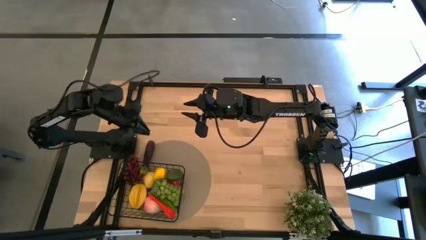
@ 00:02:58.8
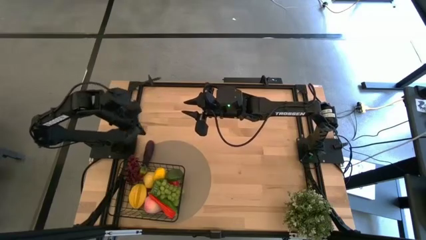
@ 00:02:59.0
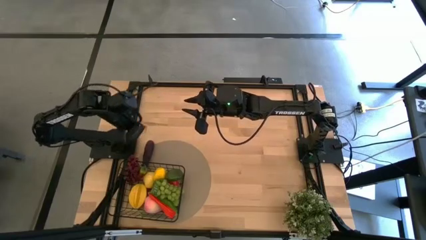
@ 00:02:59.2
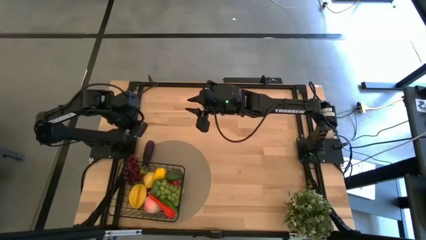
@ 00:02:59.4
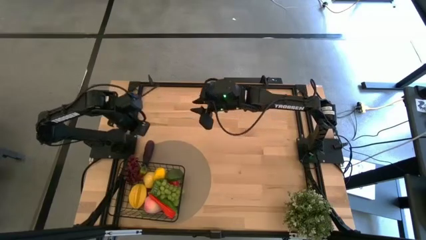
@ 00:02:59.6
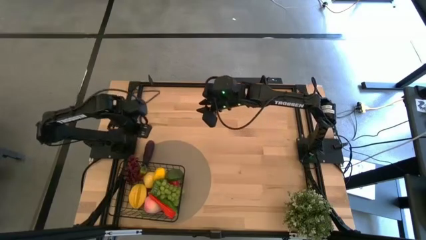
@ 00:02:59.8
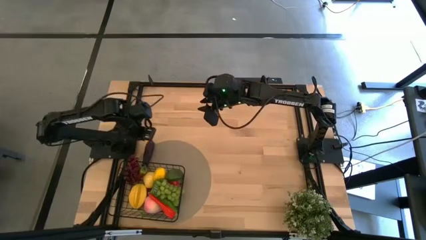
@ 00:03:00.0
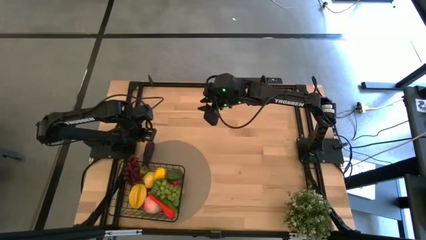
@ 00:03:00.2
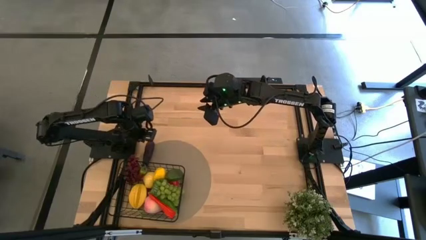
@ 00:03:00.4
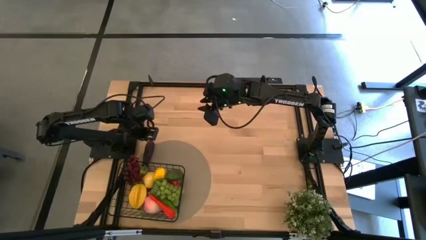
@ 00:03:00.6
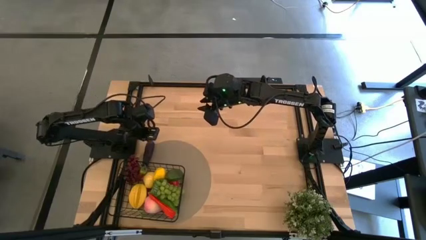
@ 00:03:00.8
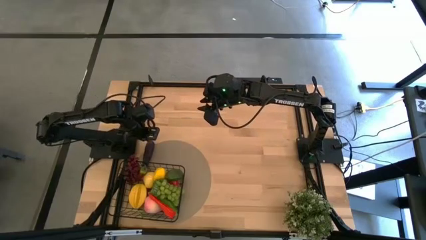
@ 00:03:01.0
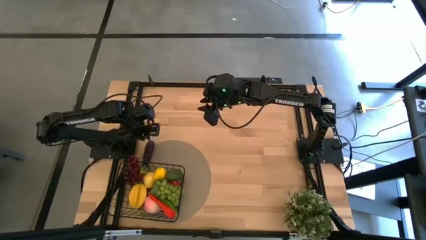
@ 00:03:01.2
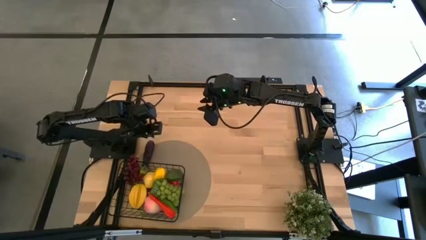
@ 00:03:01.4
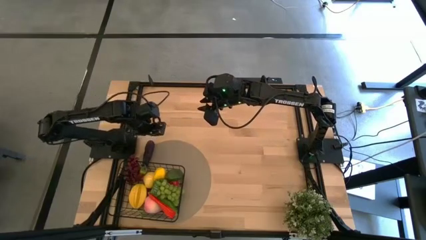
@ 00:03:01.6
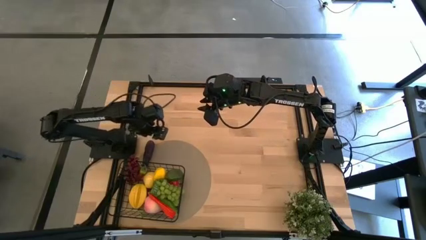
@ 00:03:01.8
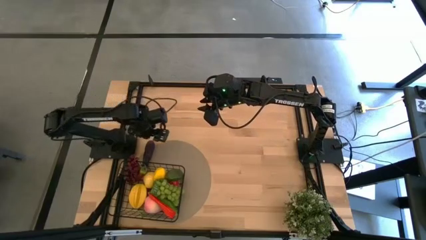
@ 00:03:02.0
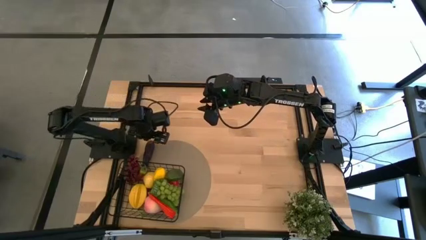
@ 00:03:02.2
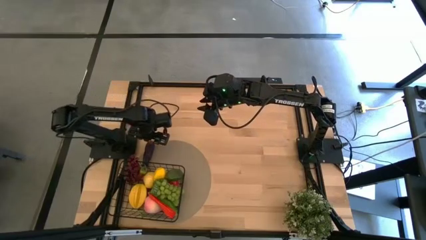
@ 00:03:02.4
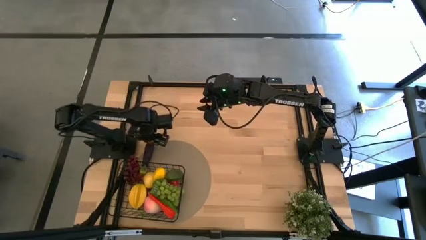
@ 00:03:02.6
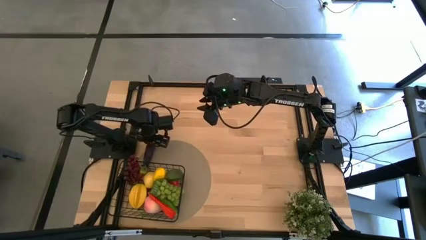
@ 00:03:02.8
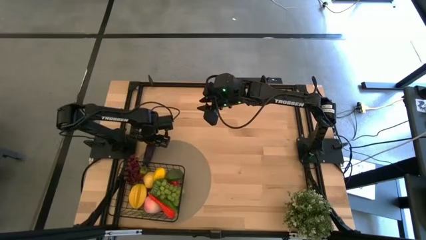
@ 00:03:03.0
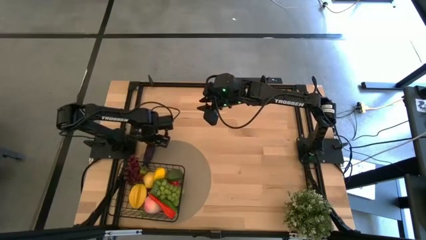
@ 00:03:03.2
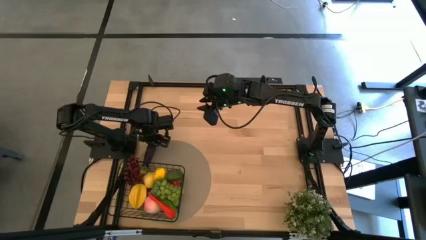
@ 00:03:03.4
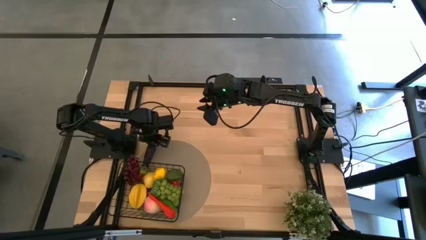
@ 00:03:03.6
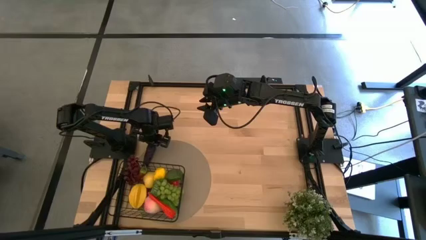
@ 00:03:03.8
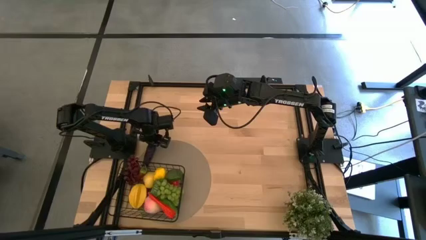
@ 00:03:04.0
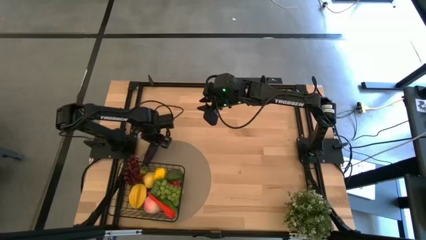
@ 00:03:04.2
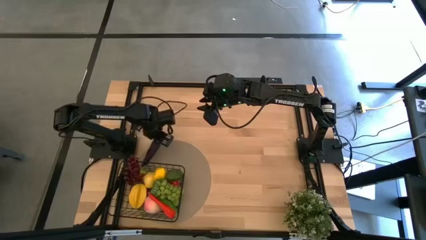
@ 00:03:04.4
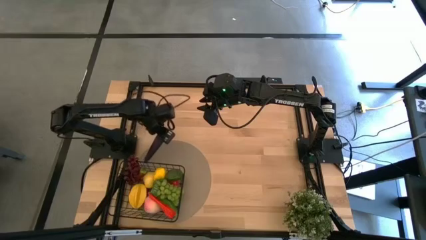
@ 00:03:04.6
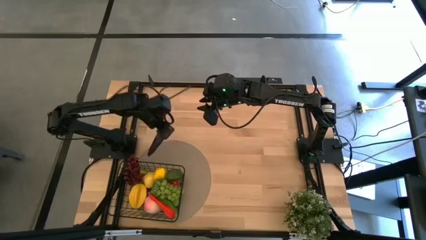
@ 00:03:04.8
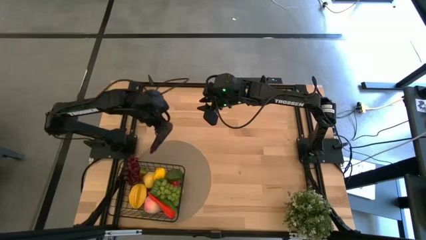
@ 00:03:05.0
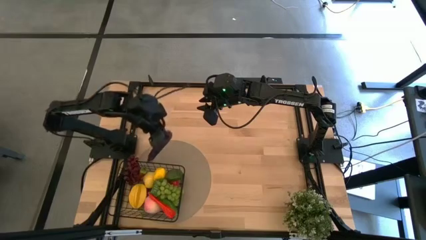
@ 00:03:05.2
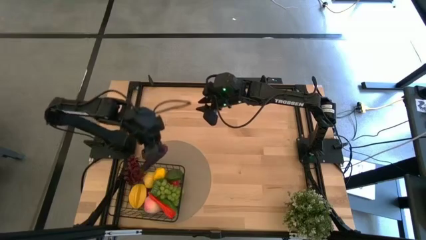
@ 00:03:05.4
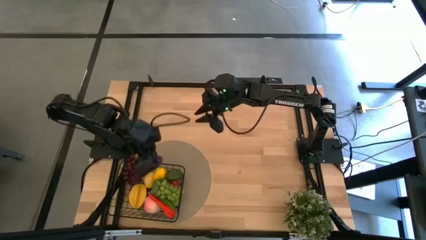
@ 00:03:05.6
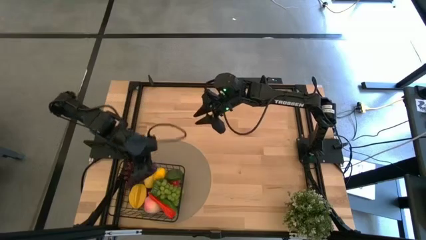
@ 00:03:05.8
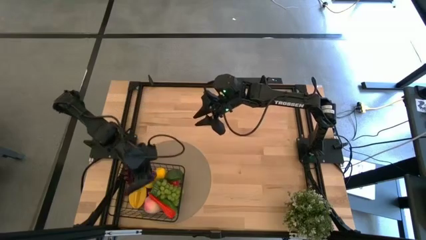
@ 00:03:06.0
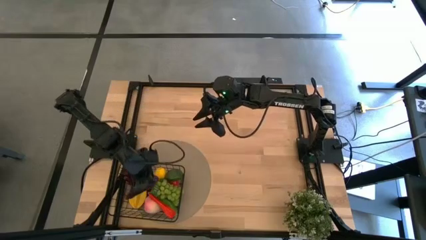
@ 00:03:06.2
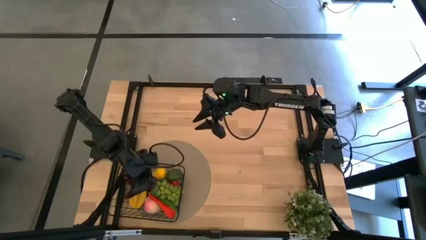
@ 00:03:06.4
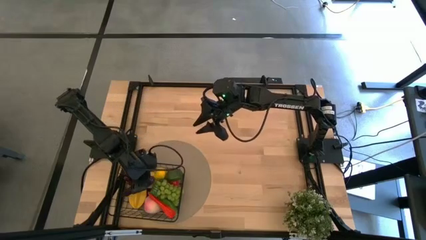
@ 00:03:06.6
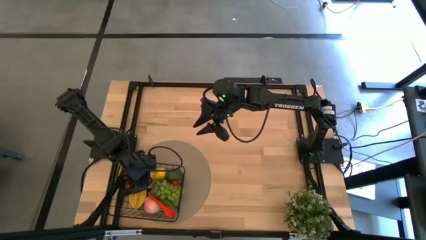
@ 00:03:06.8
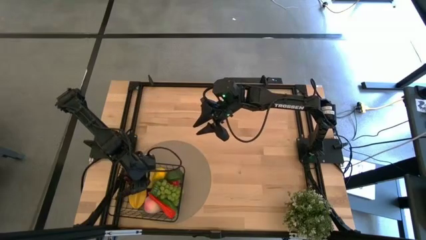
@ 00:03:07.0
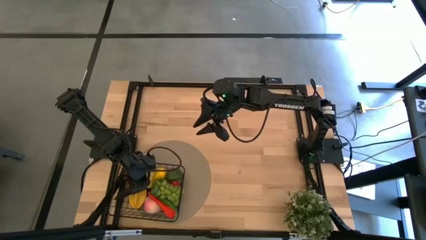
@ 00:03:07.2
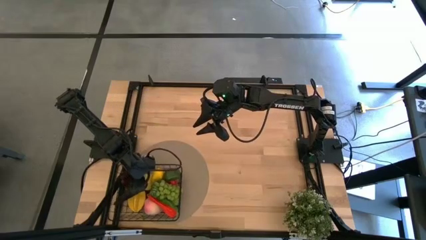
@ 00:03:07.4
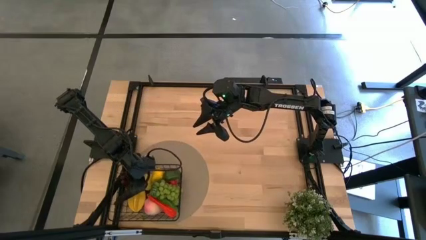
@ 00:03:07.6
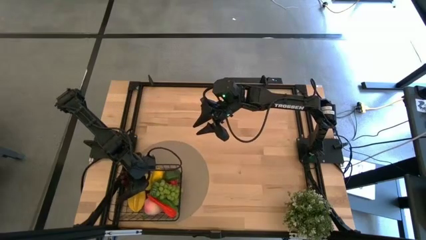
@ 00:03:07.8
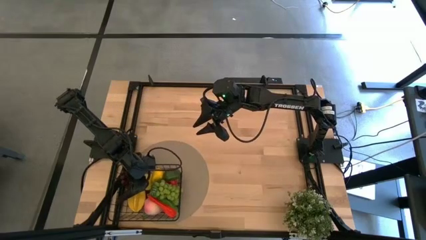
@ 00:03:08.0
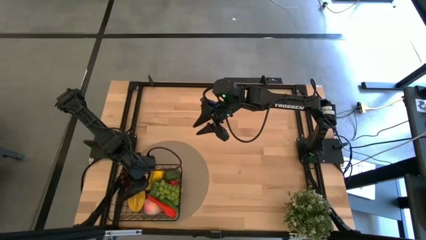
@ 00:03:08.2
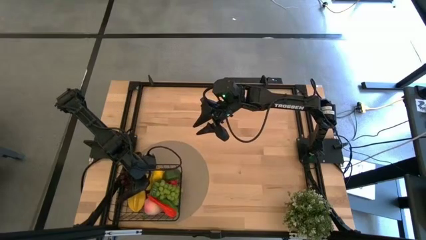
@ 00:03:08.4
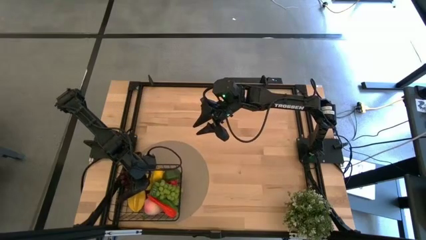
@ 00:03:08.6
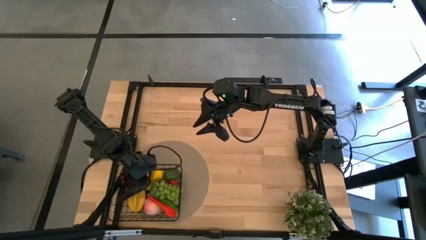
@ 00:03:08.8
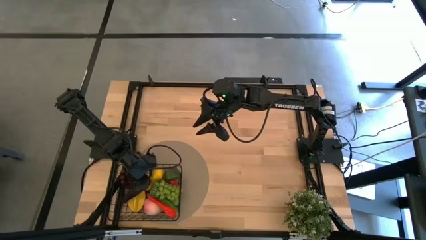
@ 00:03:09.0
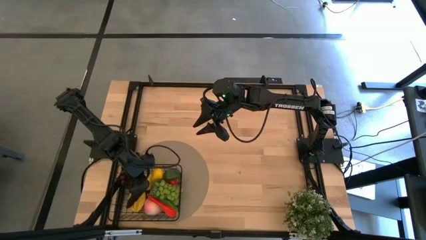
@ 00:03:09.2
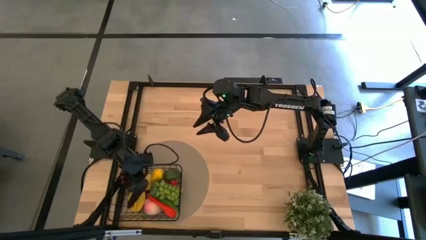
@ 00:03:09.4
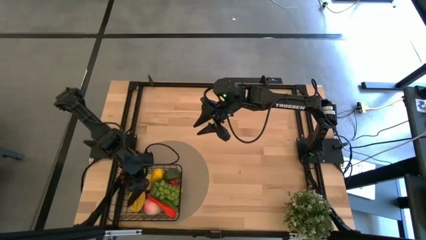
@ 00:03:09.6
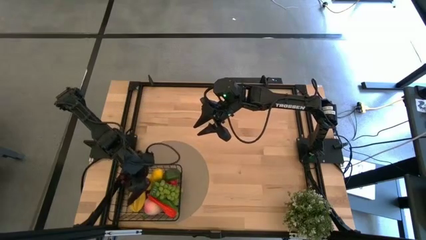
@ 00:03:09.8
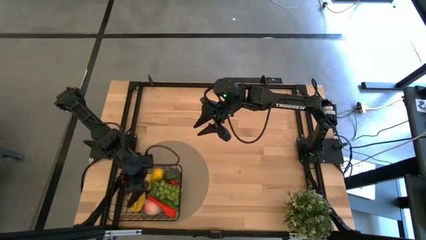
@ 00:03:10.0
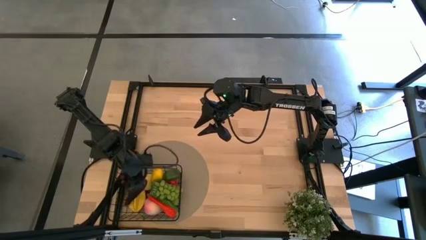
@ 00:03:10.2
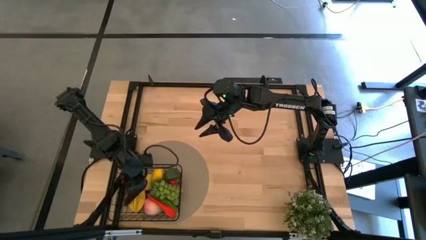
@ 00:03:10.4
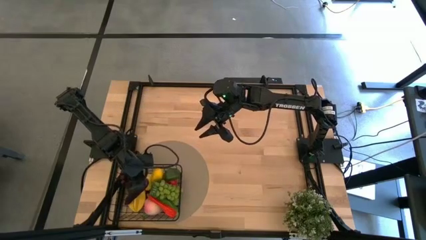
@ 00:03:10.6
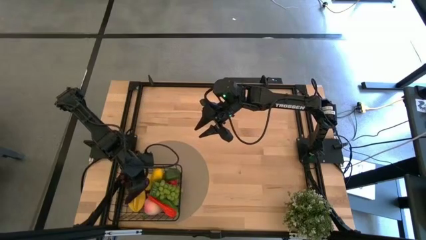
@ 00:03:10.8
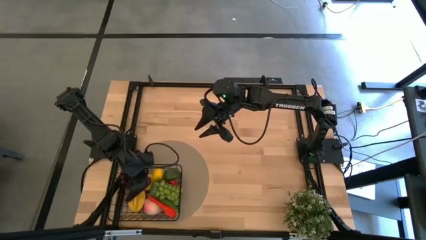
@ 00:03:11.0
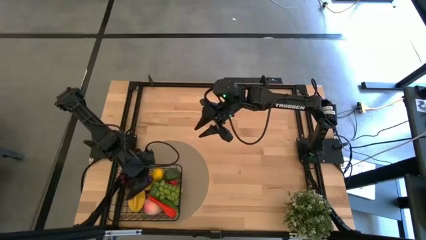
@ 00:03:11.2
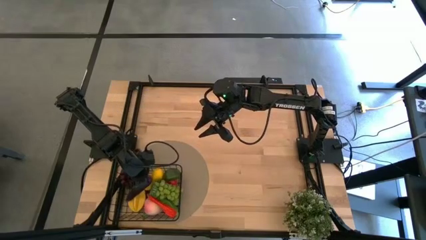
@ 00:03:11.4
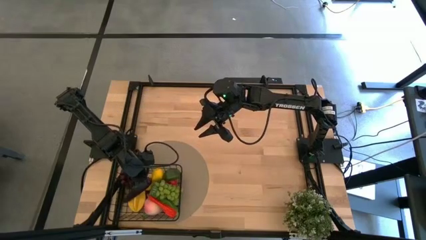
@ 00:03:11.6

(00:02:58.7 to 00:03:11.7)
Task: Build produce basket
Put the purple eggplant into the wire basket
